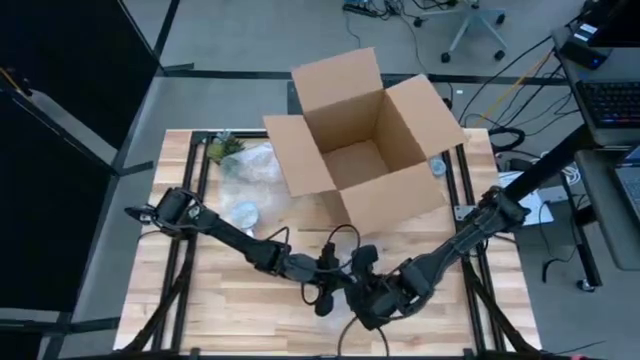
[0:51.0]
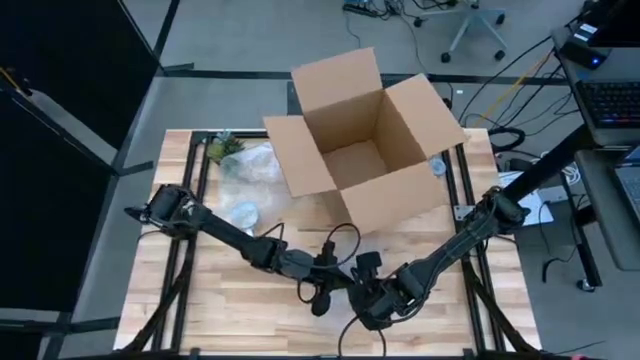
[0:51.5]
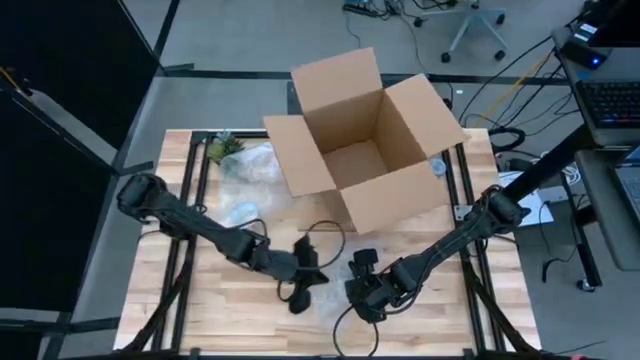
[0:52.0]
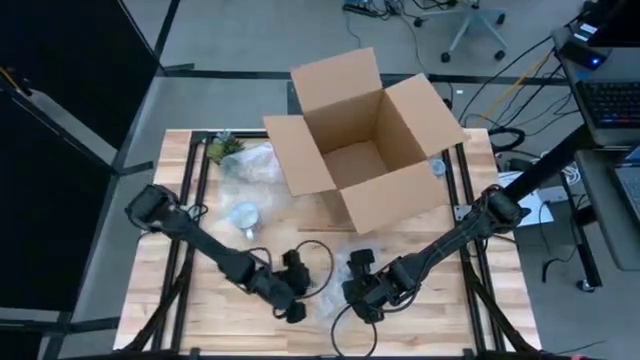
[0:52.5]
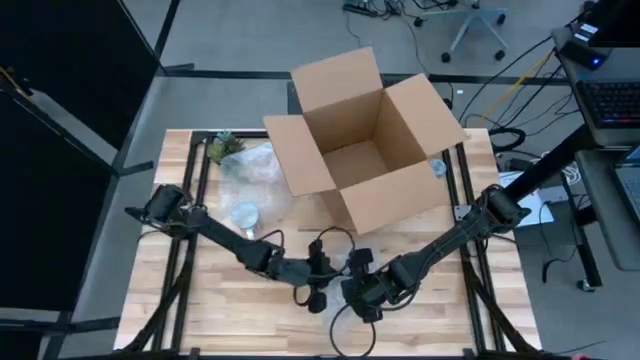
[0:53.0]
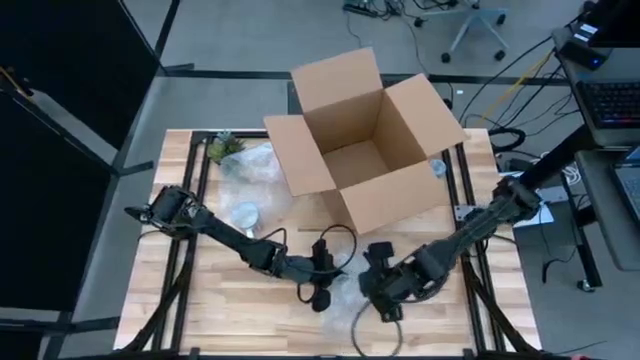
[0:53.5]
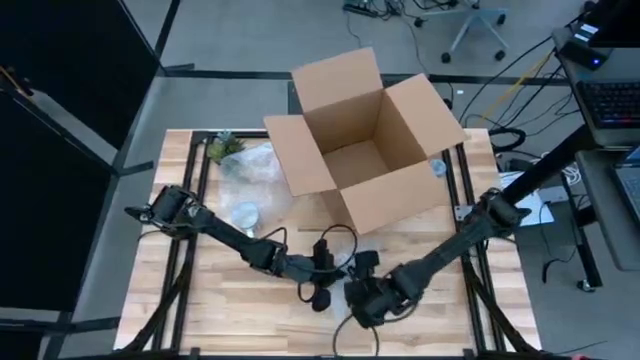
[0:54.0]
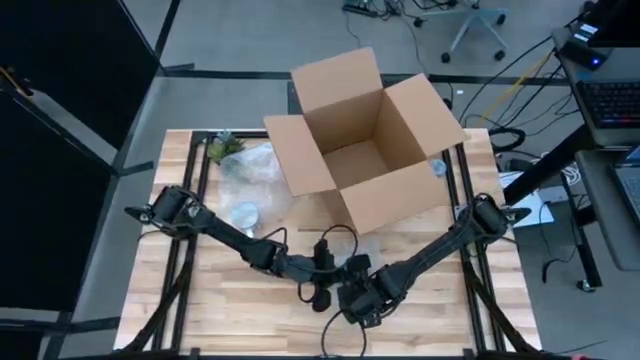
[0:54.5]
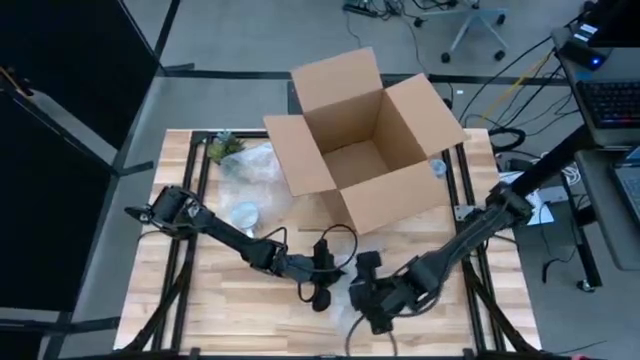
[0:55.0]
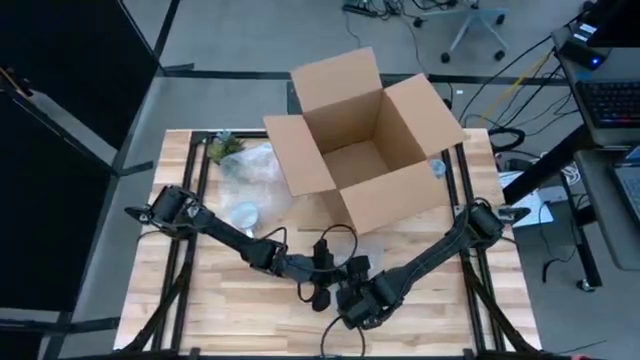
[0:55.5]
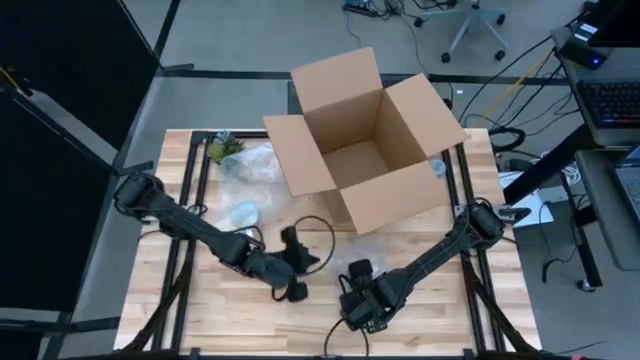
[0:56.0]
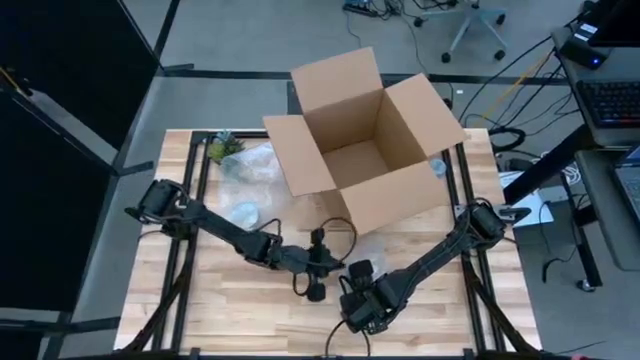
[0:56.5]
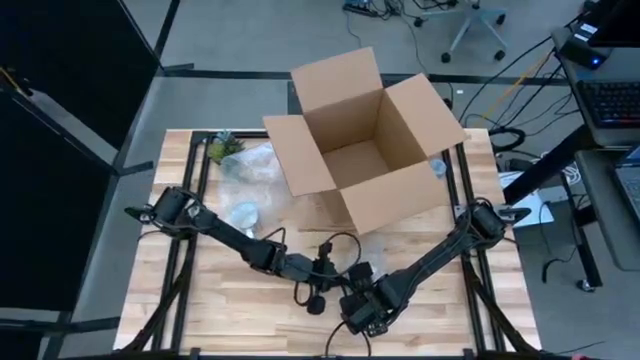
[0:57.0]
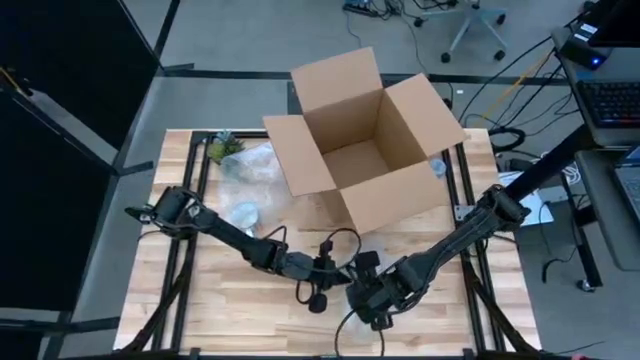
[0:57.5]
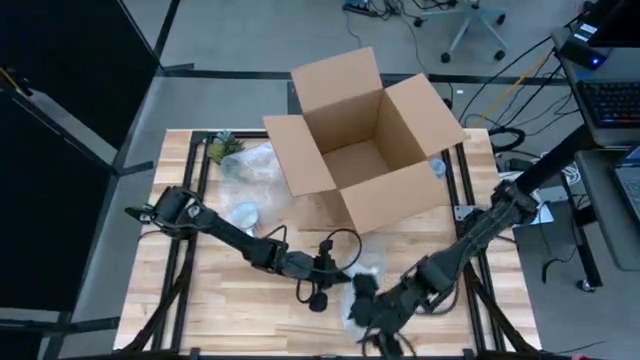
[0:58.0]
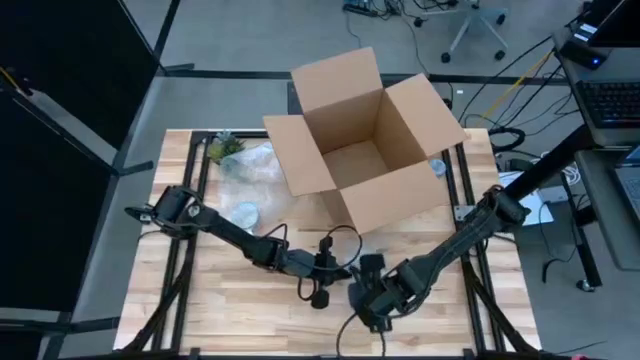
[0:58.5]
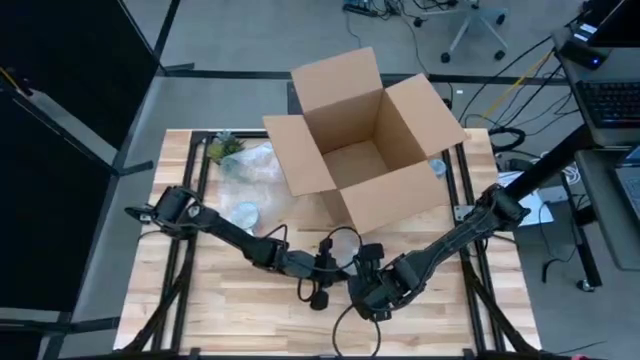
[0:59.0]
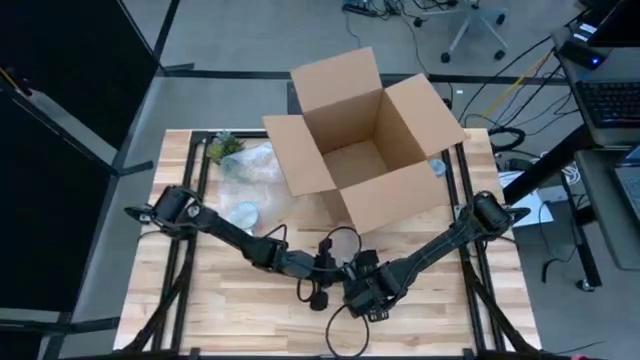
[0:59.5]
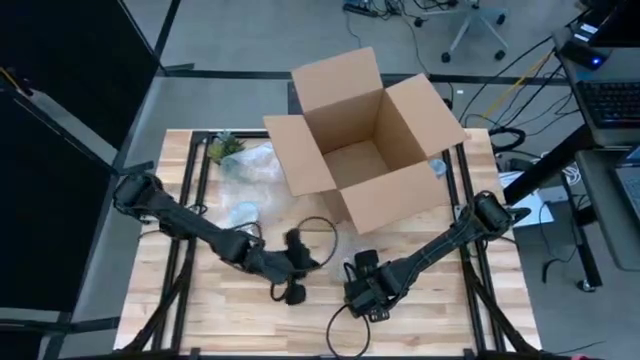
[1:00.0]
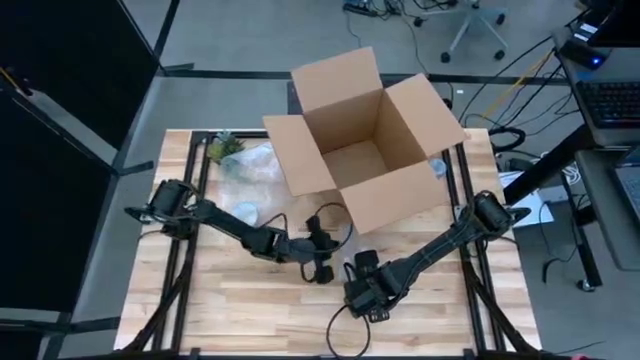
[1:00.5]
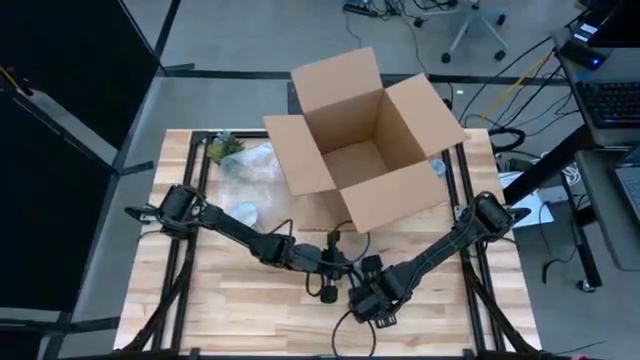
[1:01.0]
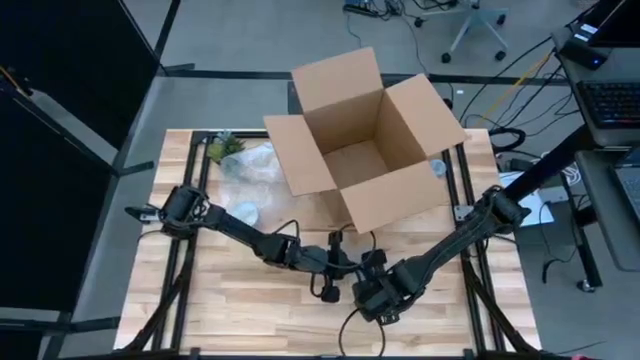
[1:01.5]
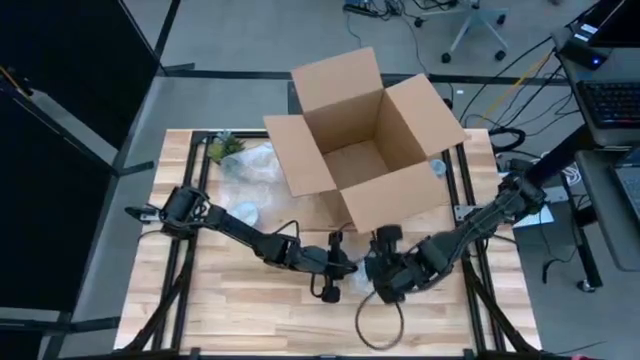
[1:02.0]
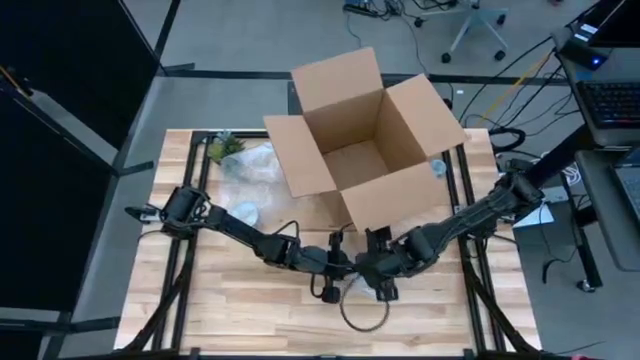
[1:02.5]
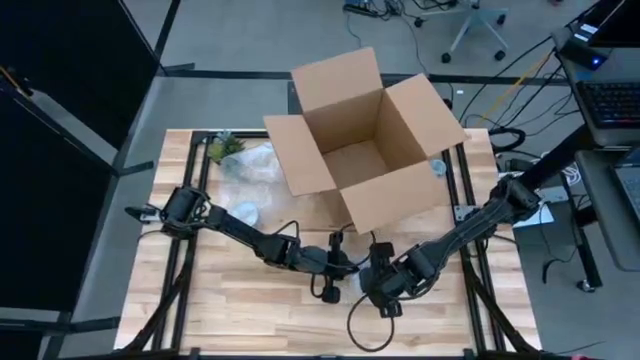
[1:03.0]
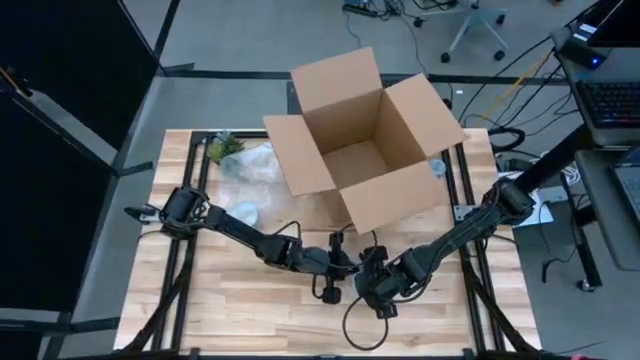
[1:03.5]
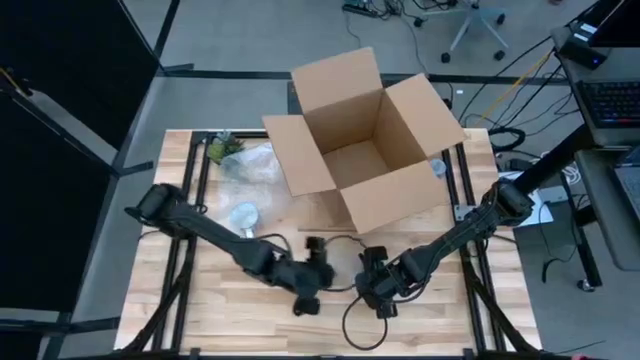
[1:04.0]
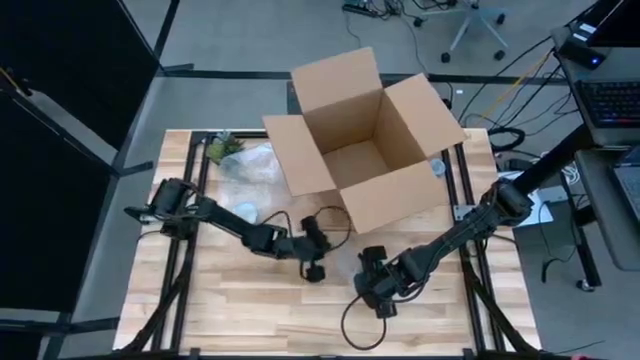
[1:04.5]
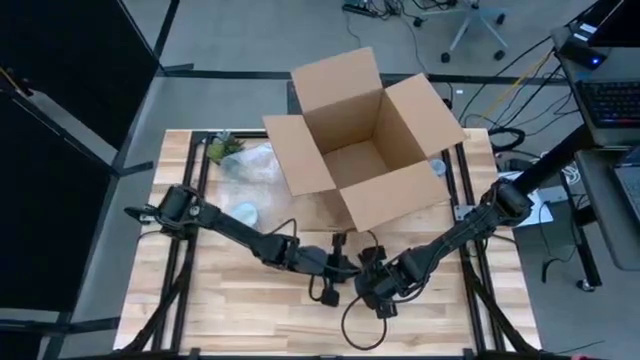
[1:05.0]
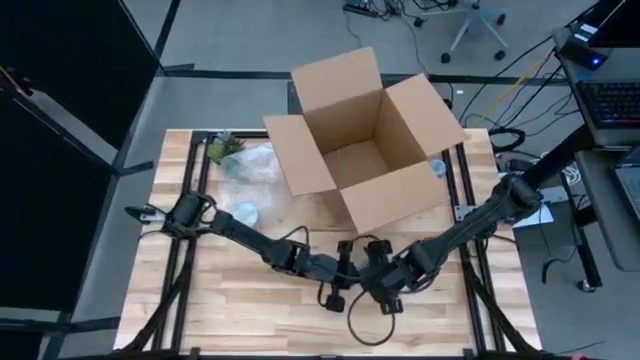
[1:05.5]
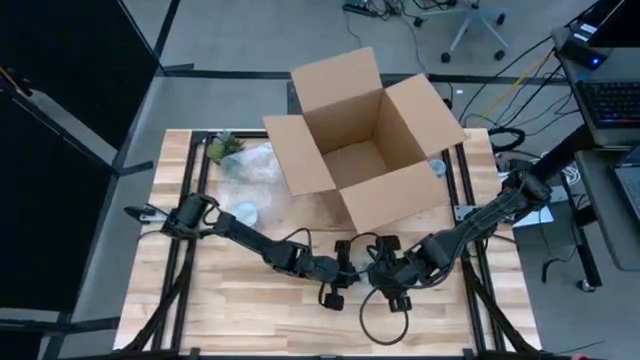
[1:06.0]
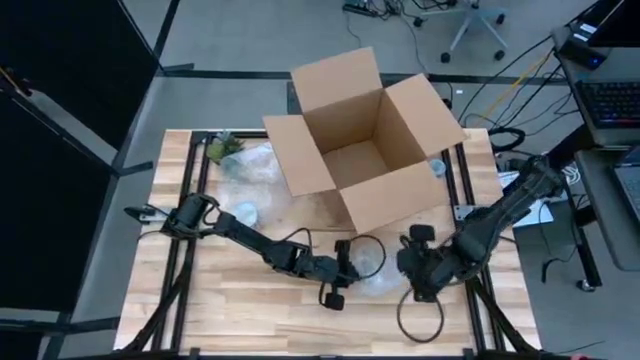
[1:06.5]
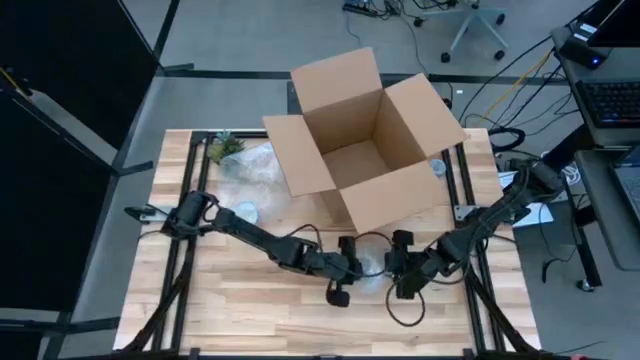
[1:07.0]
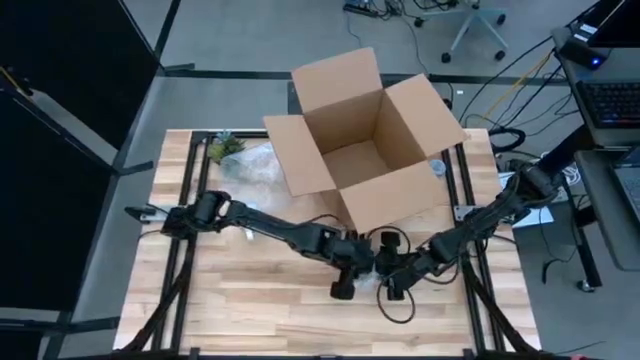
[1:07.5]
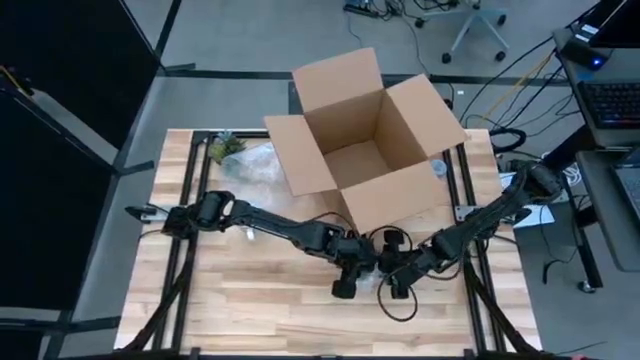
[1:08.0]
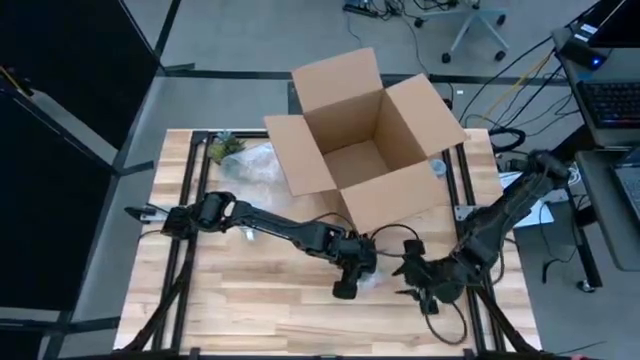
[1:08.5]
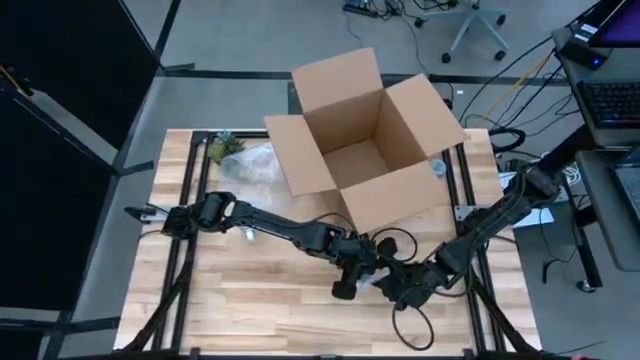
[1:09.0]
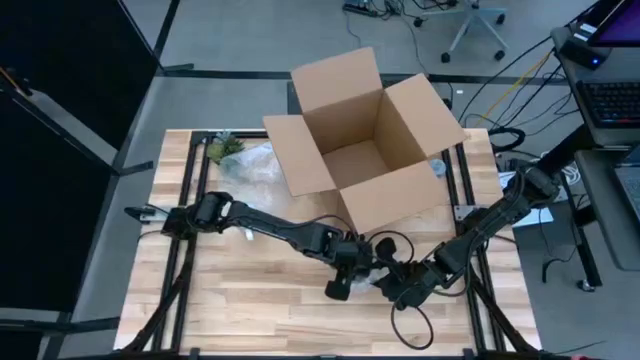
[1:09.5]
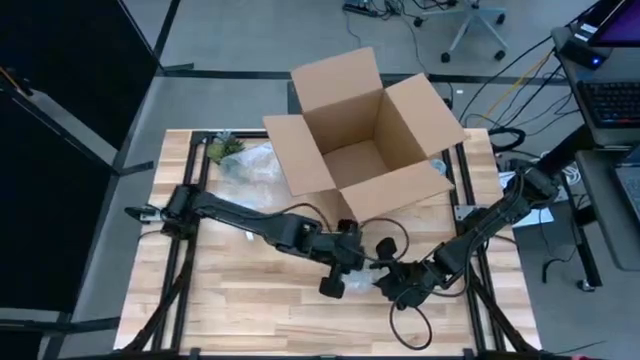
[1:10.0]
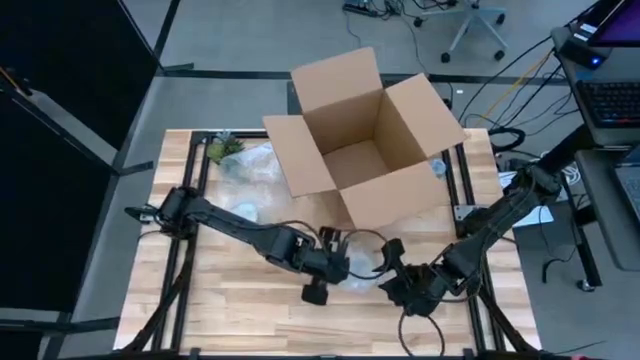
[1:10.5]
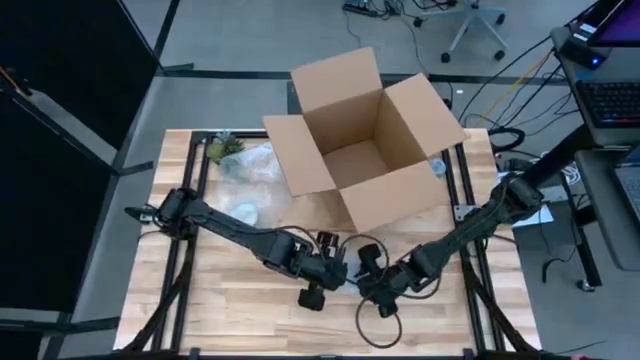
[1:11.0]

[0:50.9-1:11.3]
Task: wrap mug
Wrap the yellow mug with the bubble wrap

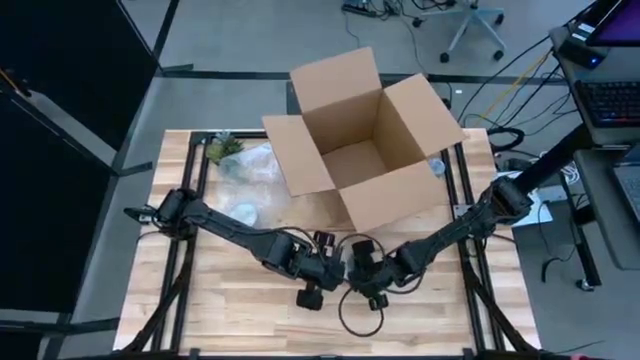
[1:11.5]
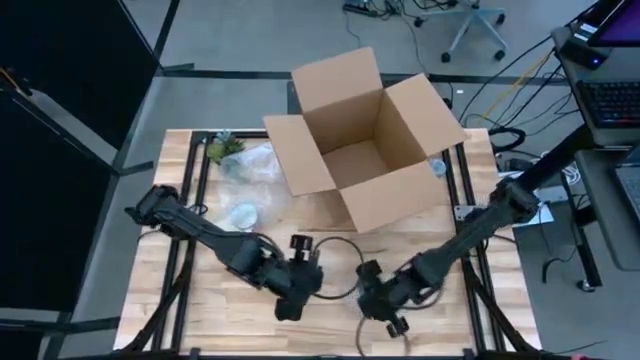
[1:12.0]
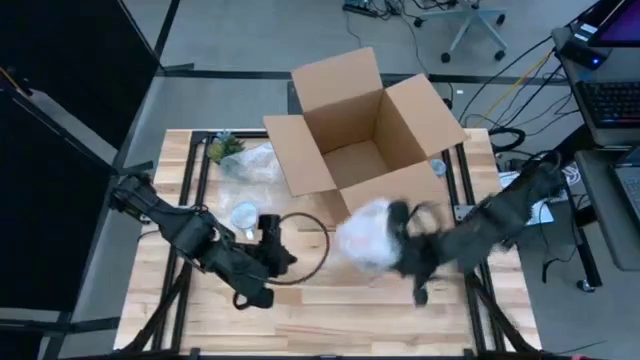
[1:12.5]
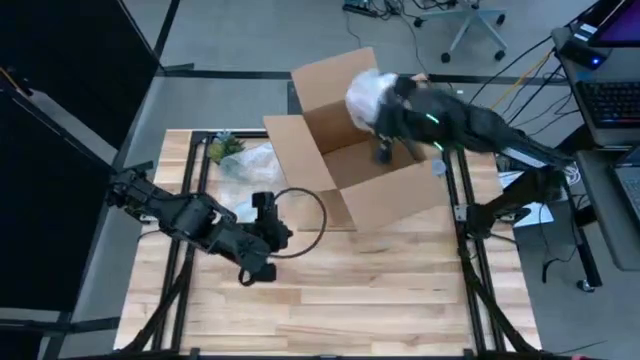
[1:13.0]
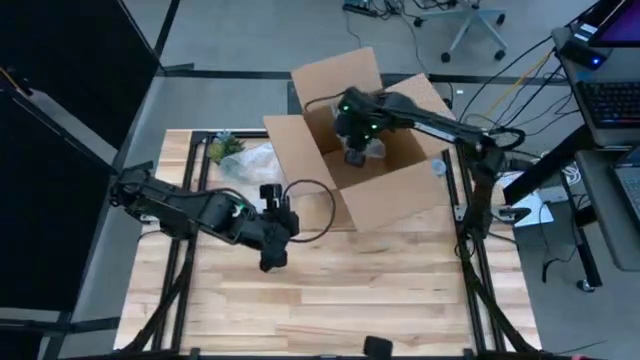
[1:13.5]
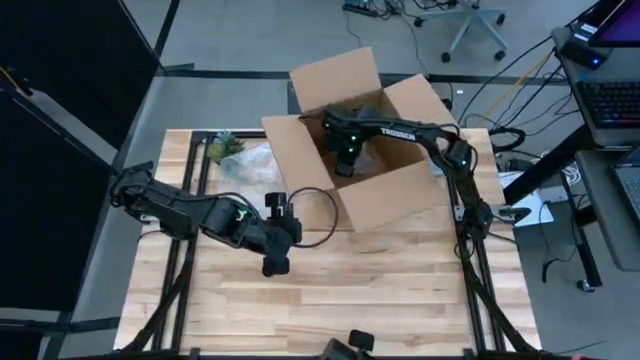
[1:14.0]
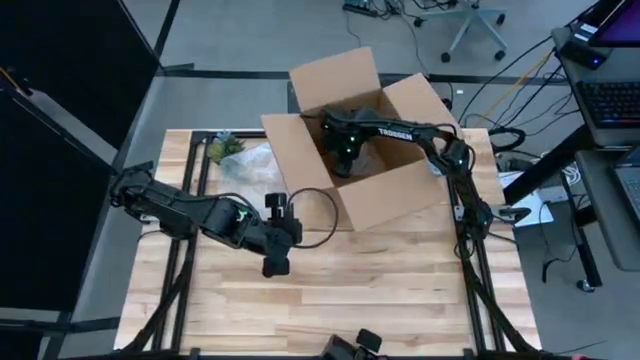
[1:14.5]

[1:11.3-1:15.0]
Put the yellow wrapped mug into the box
